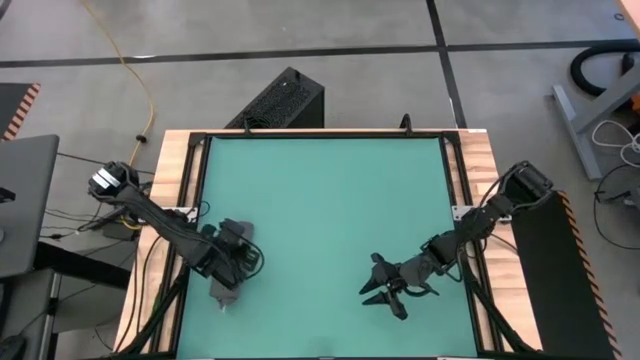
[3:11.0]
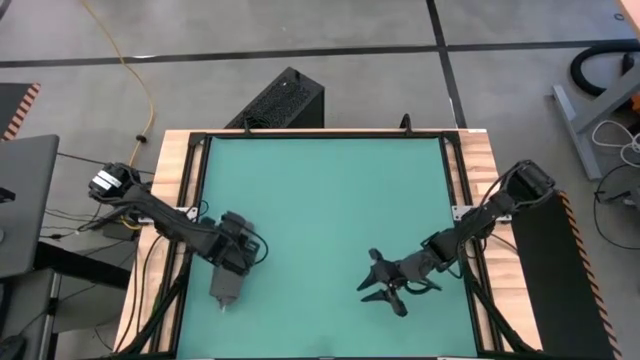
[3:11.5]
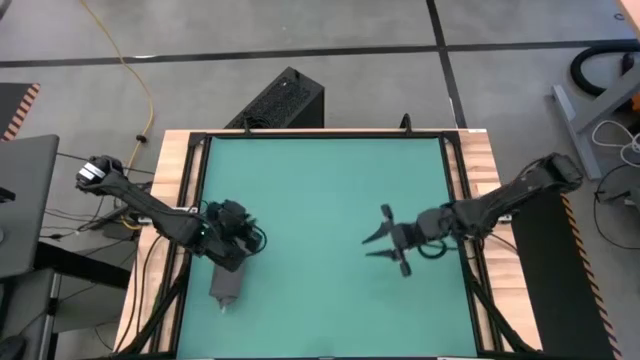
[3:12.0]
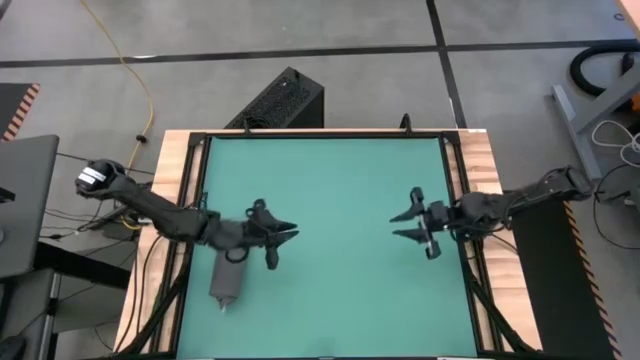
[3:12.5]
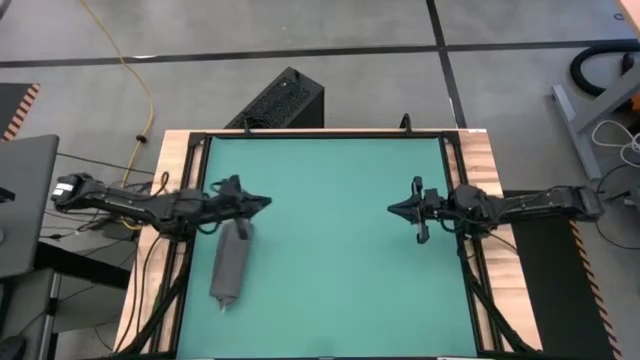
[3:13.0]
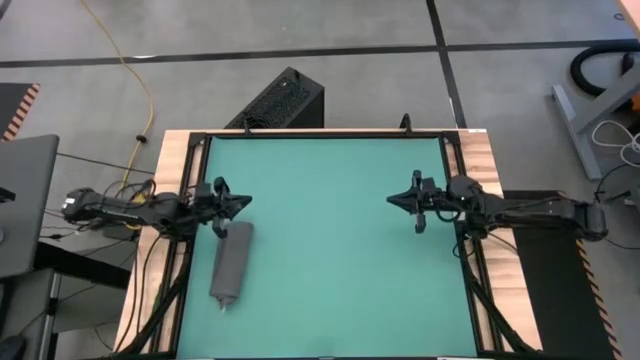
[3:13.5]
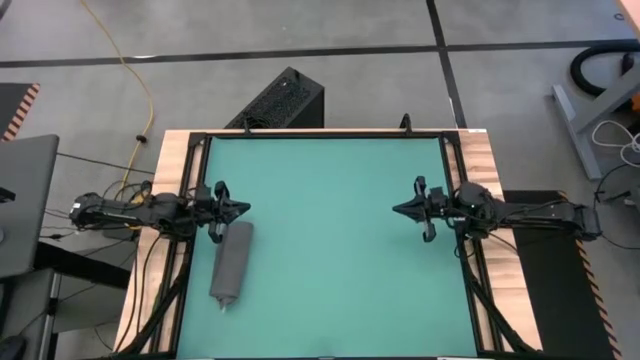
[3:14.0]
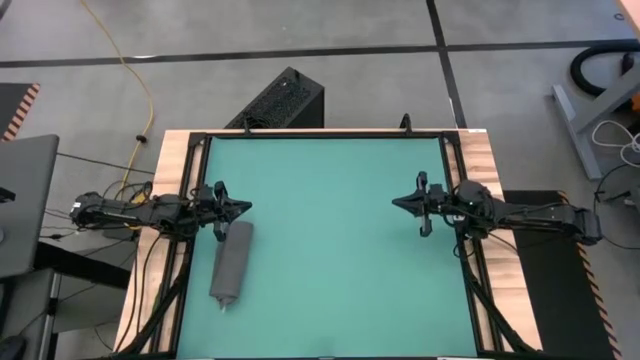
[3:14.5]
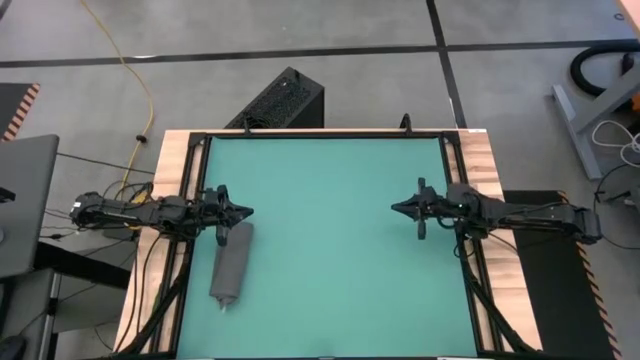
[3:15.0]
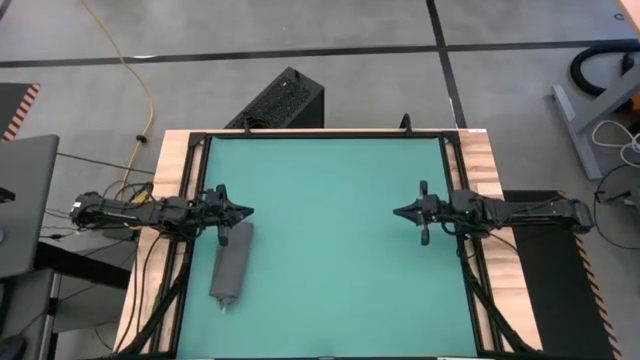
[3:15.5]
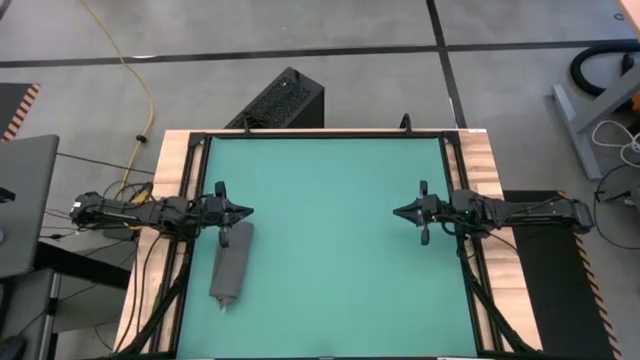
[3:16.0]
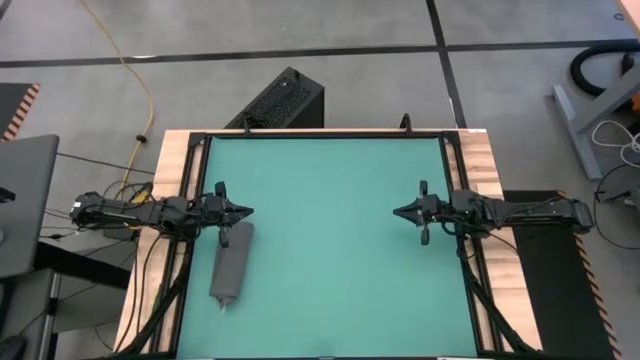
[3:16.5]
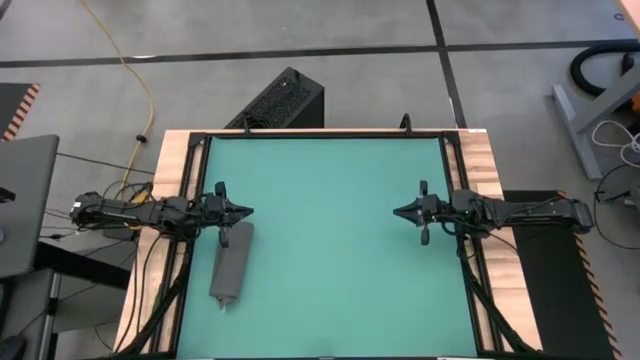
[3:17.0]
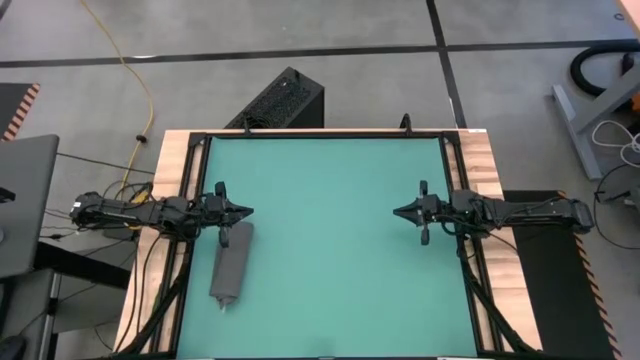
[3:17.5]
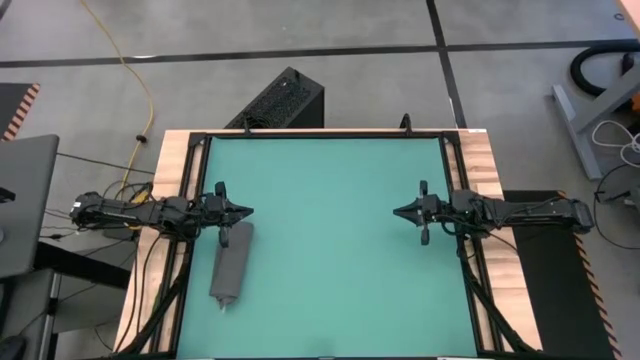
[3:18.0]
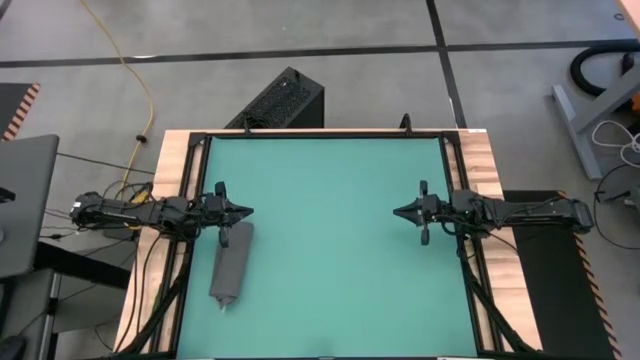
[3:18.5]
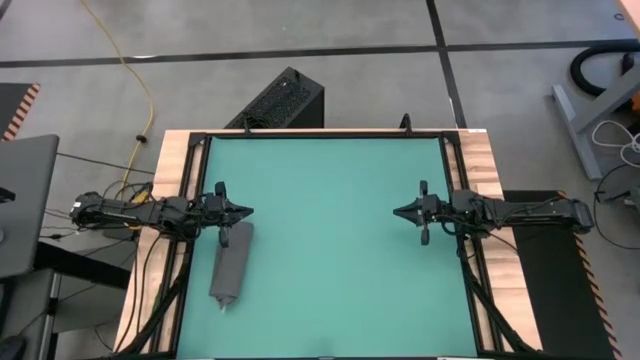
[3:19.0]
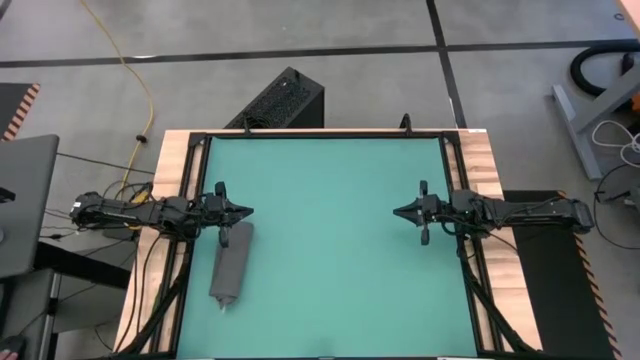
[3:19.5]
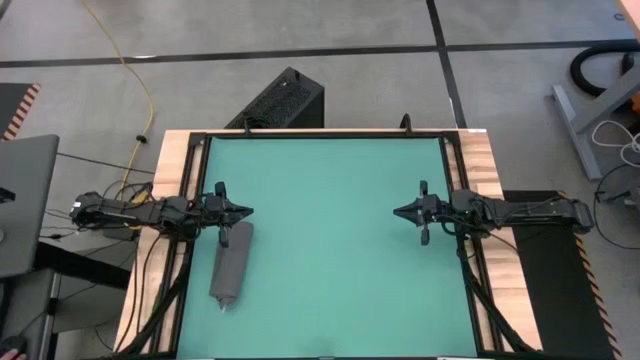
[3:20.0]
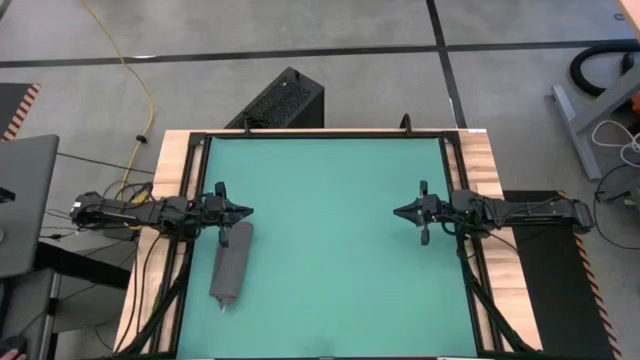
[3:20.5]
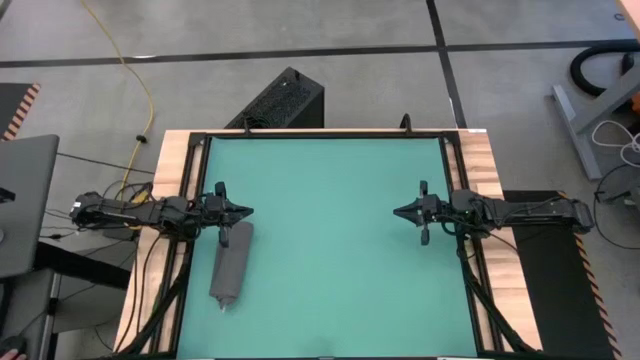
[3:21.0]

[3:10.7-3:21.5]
Task: Roll towel
Return to Home Position

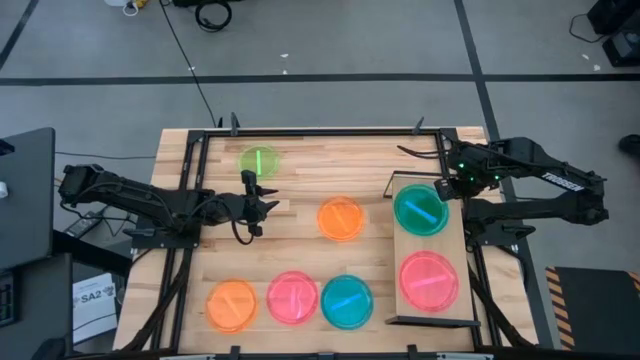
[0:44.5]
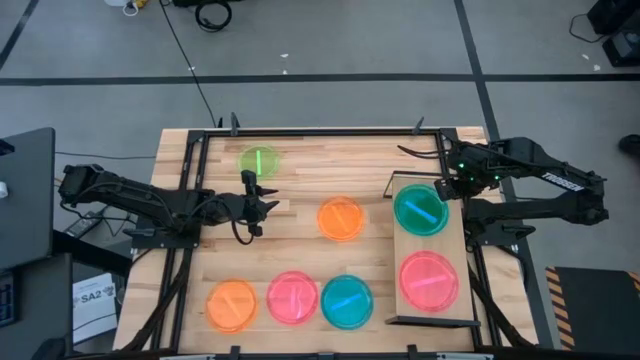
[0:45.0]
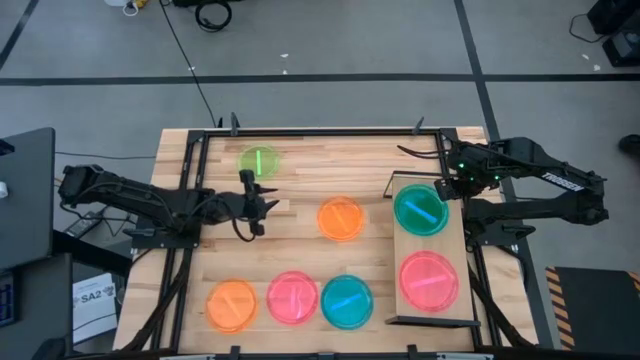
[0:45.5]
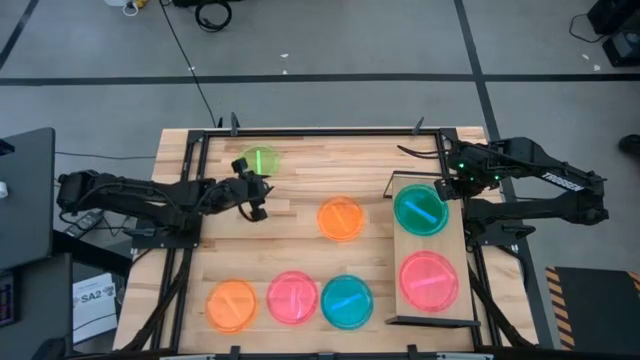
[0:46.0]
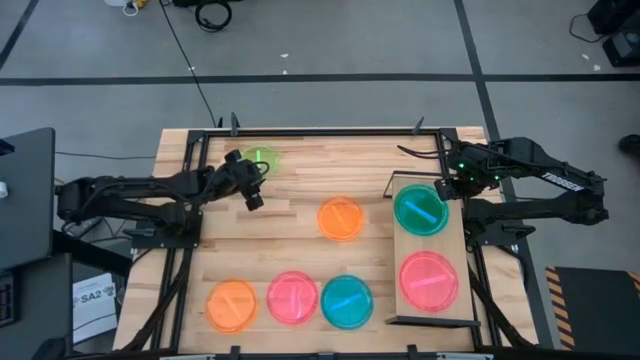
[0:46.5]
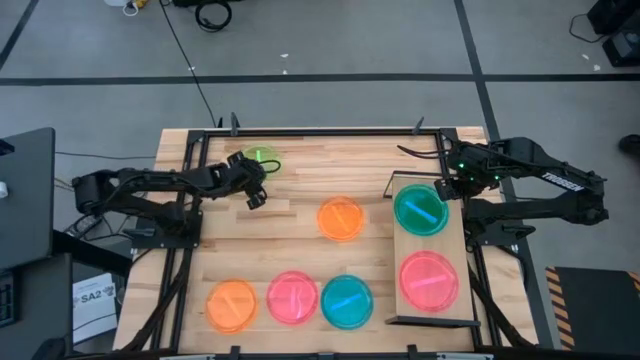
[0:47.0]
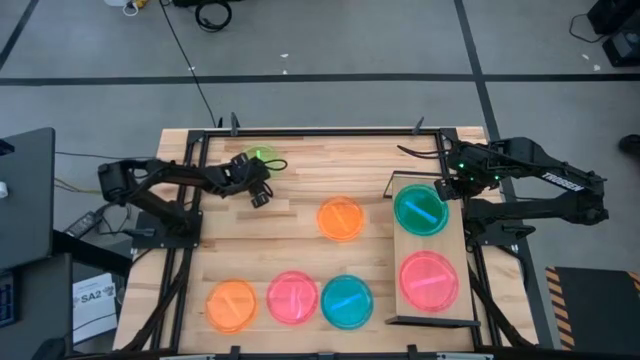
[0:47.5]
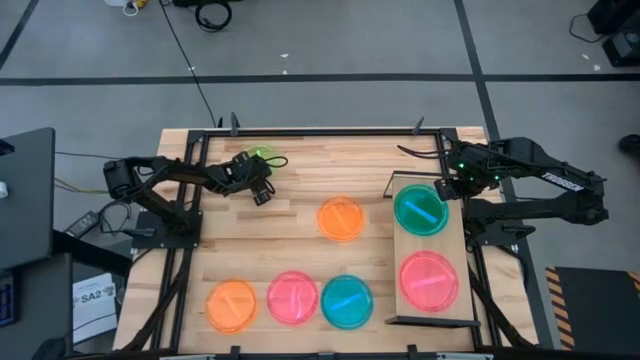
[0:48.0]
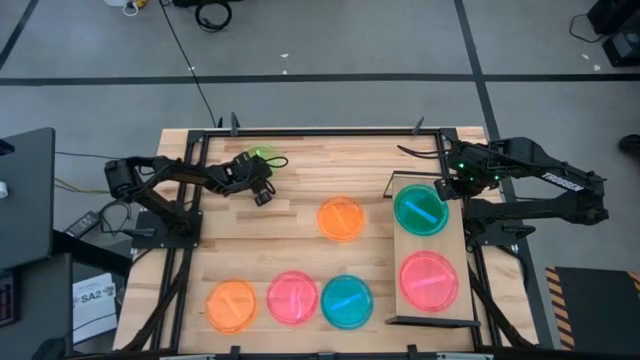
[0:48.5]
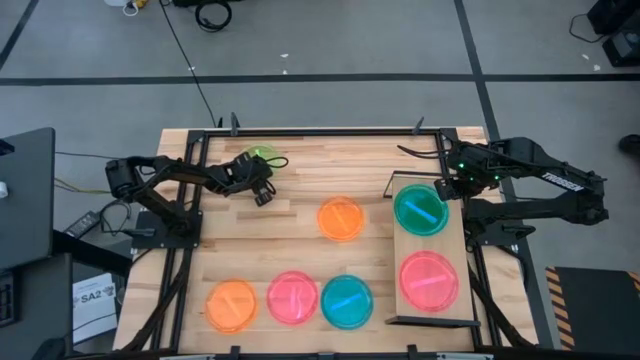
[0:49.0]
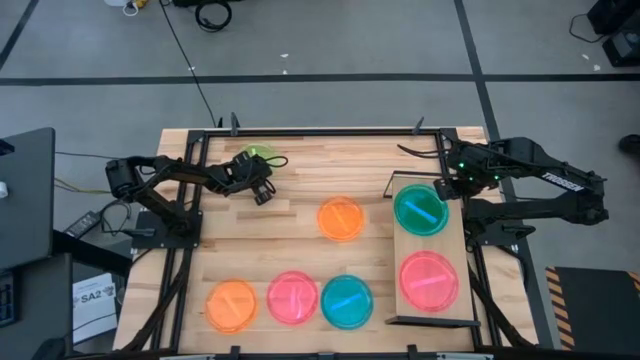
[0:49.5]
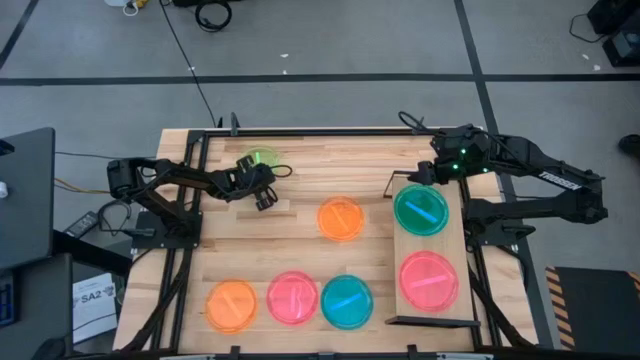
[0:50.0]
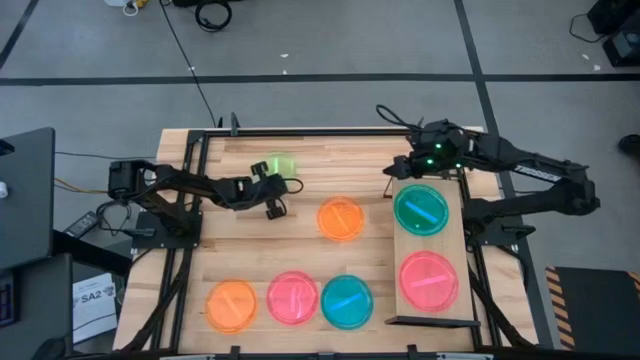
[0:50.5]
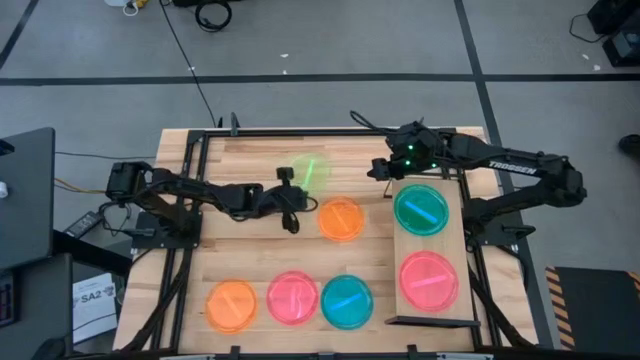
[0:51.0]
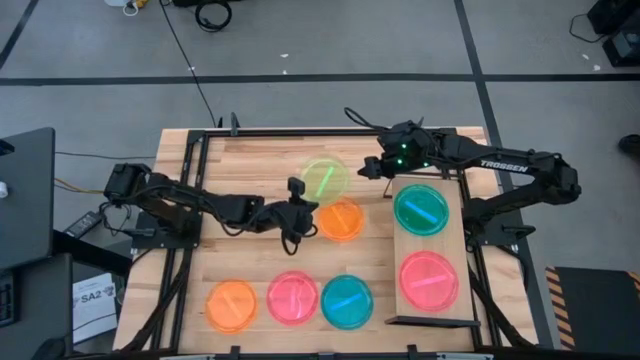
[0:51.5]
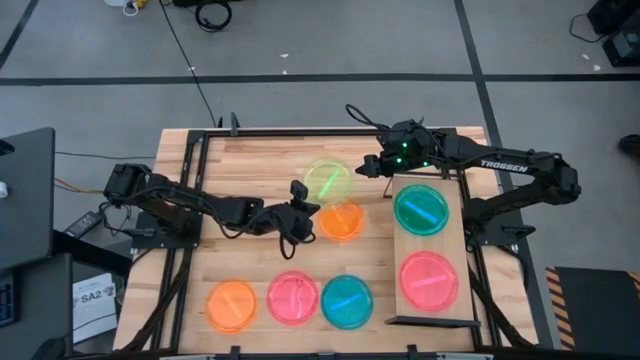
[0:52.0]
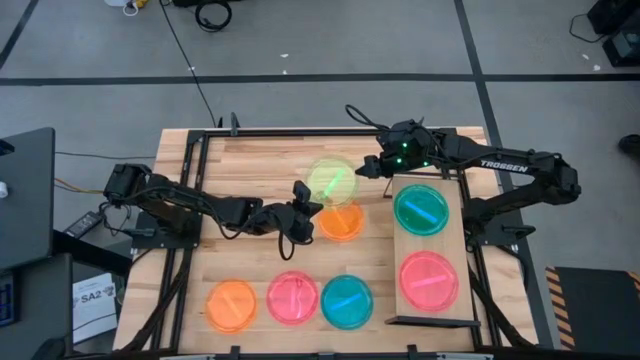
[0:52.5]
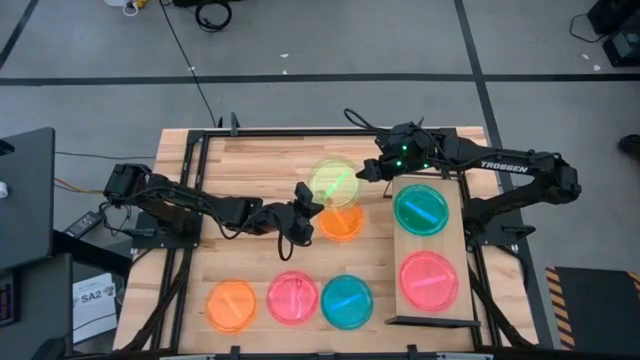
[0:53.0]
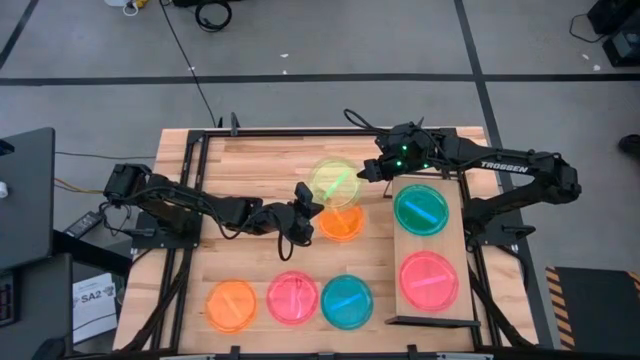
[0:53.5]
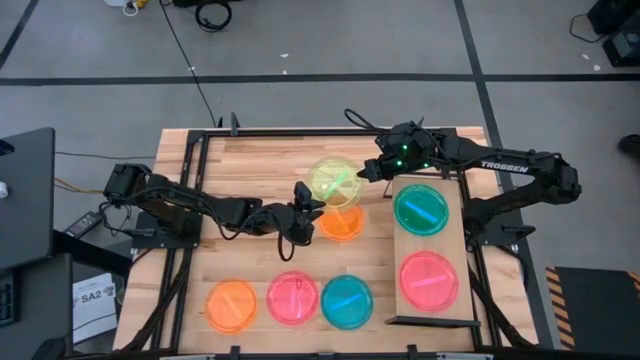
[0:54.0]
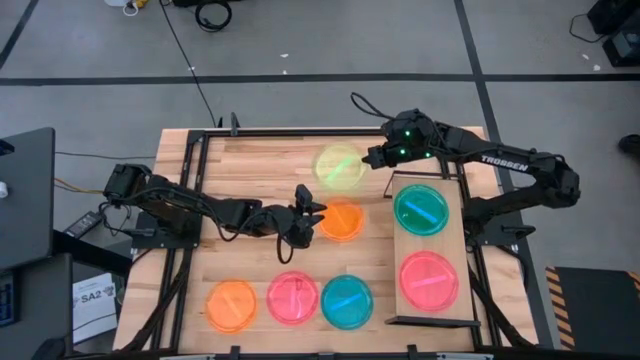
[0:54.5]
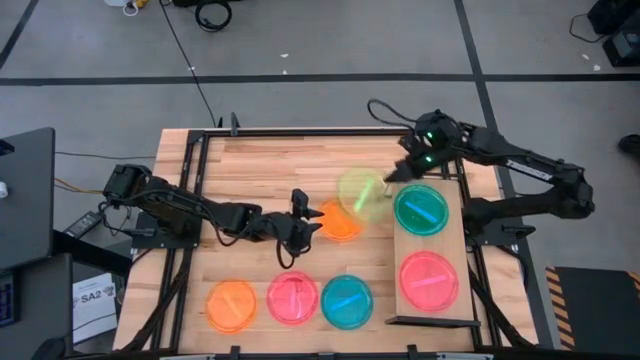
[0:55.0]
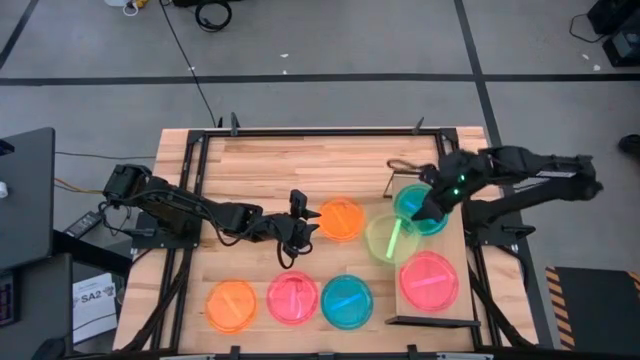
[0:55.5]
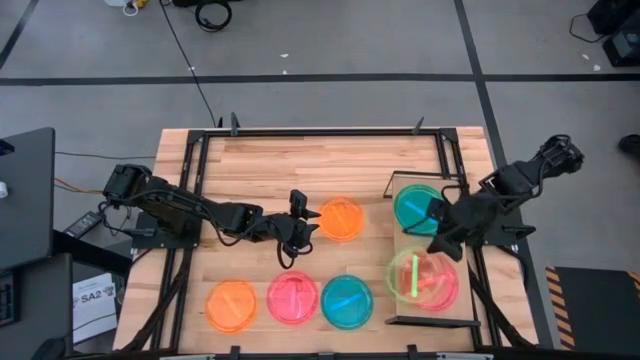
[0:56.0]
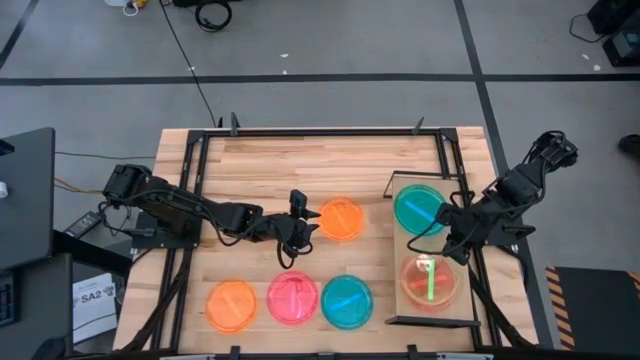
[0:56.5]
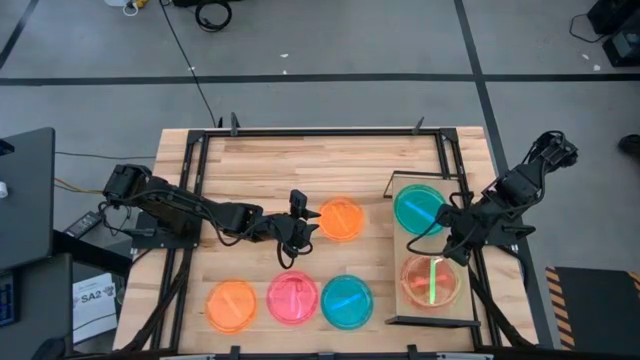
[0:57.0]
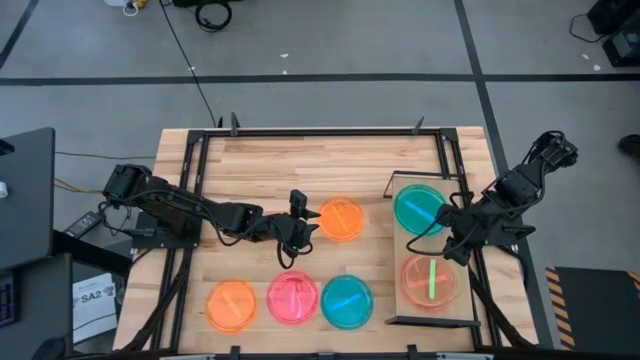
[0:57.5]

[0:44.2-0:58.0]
Task: Place and stack plates onto a shelf
Stack the green transparent plate on top of the pink transparent plate on the shelf
